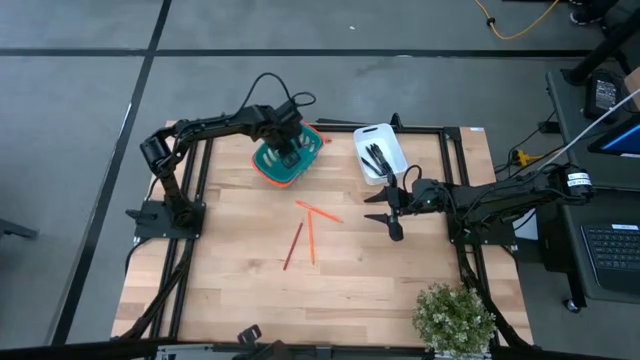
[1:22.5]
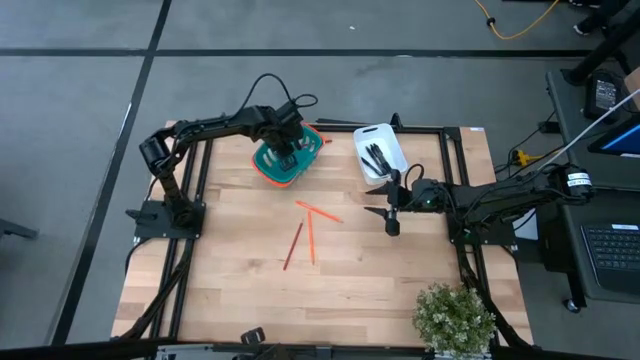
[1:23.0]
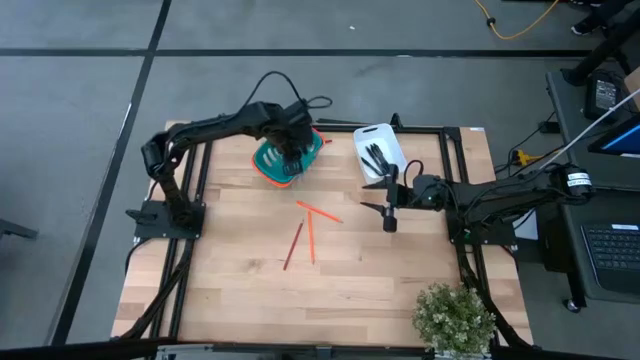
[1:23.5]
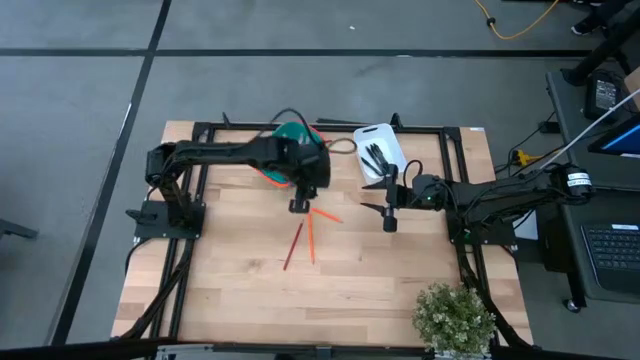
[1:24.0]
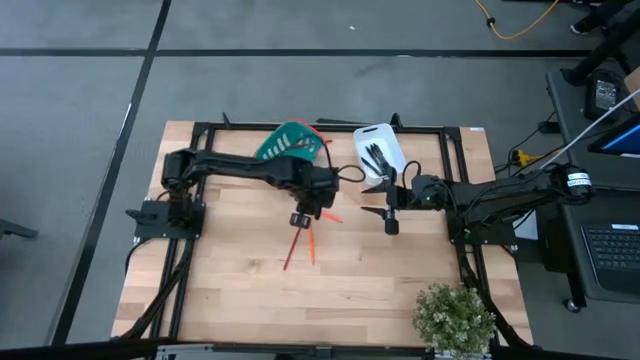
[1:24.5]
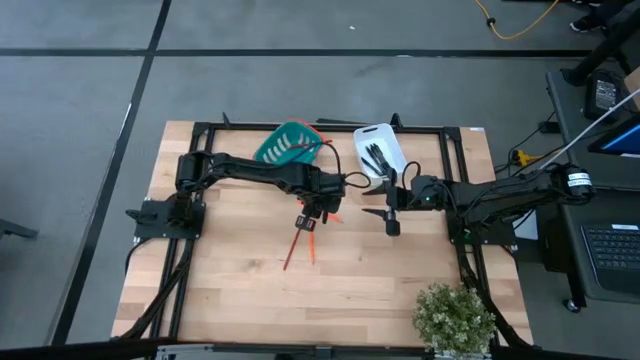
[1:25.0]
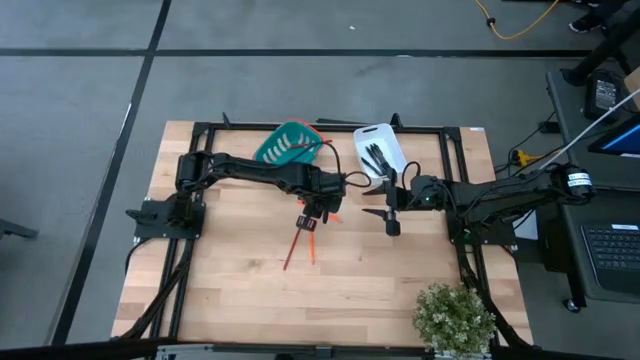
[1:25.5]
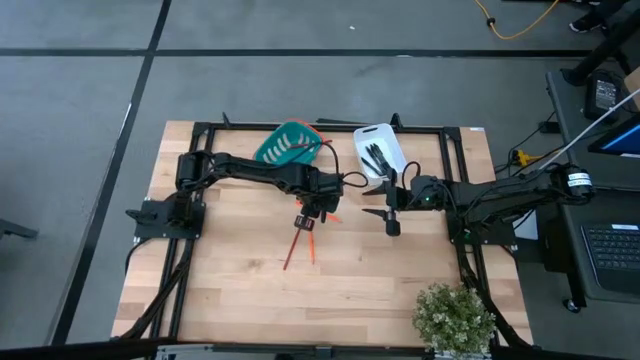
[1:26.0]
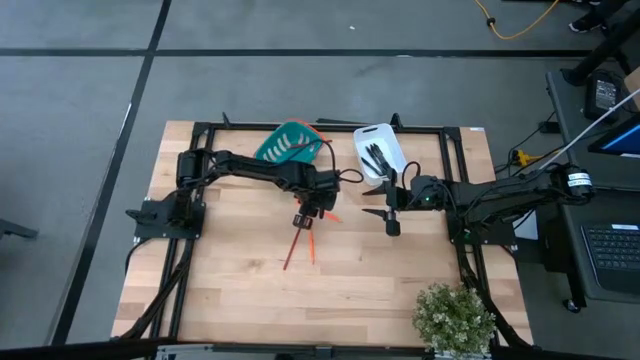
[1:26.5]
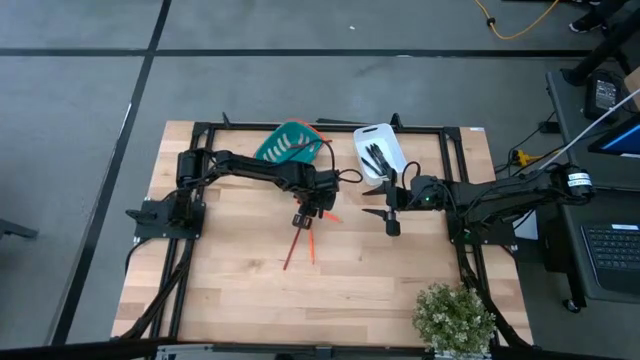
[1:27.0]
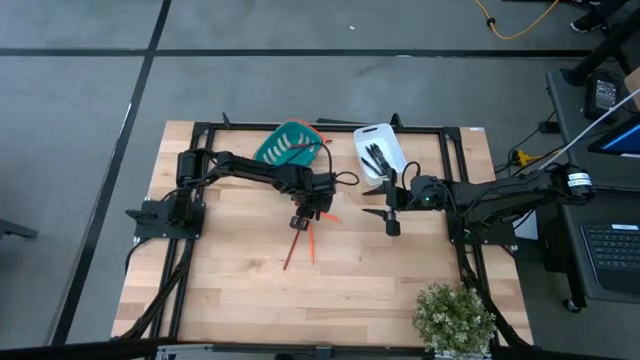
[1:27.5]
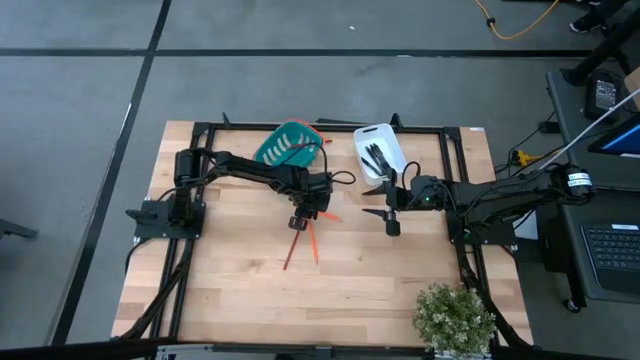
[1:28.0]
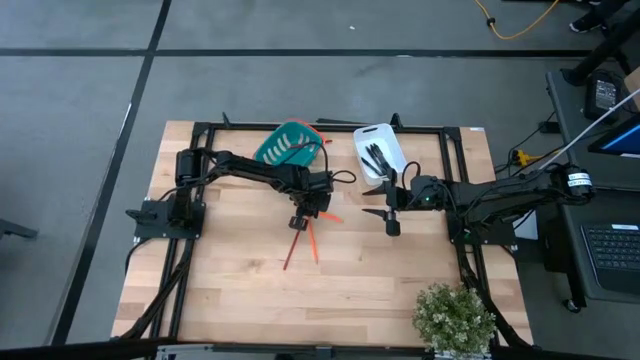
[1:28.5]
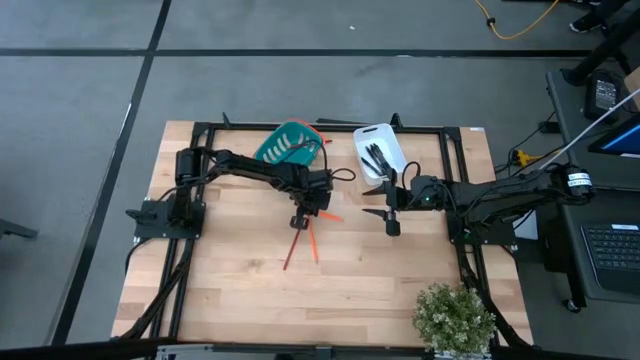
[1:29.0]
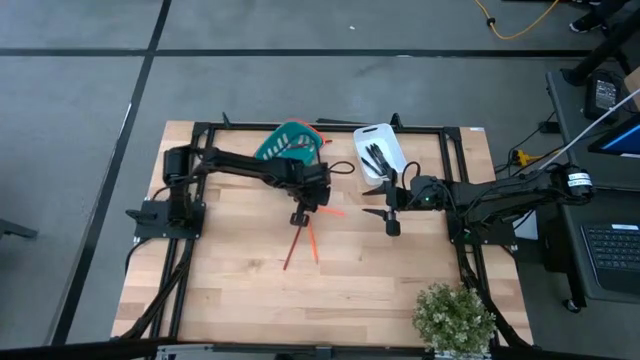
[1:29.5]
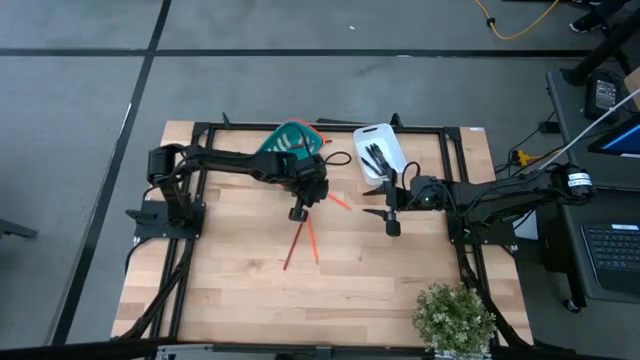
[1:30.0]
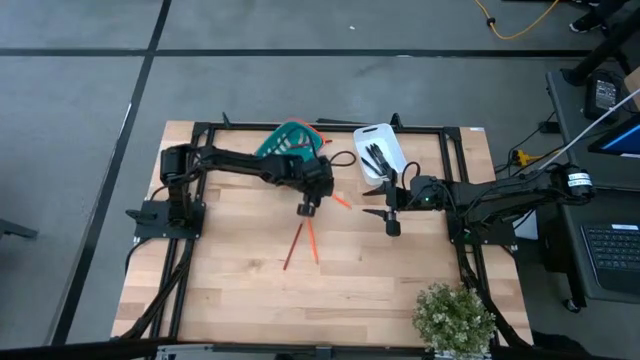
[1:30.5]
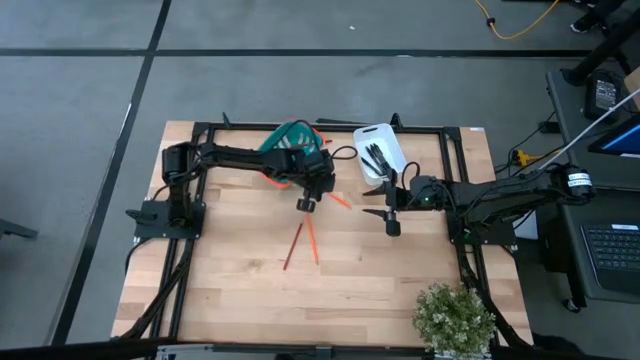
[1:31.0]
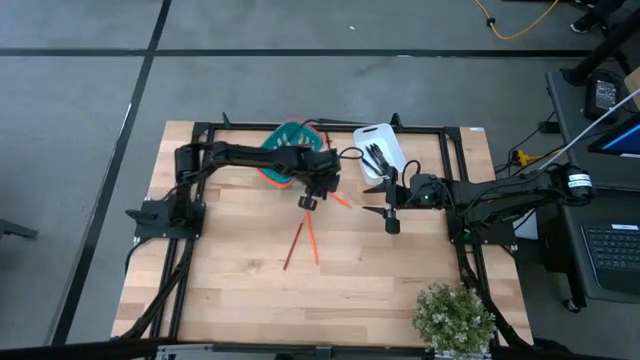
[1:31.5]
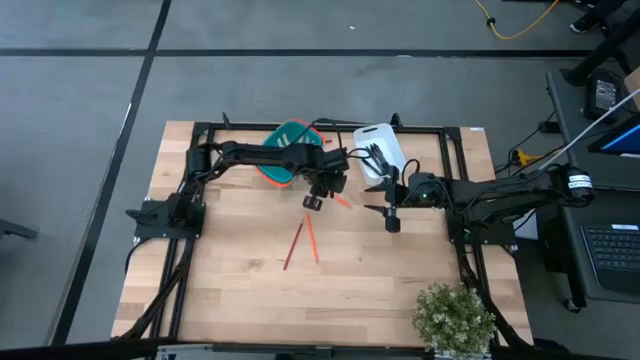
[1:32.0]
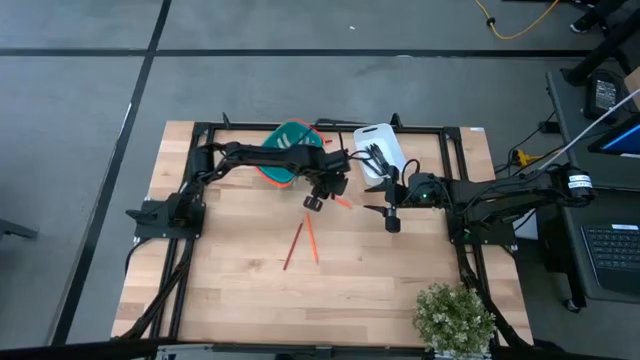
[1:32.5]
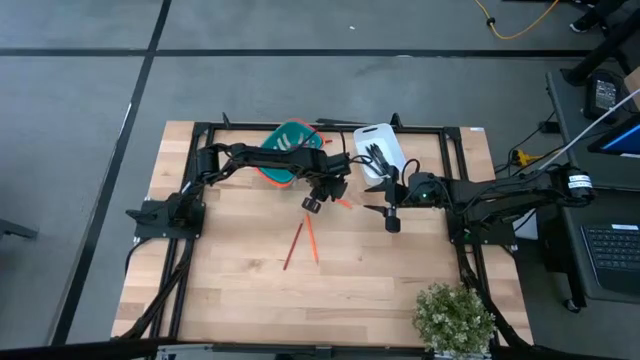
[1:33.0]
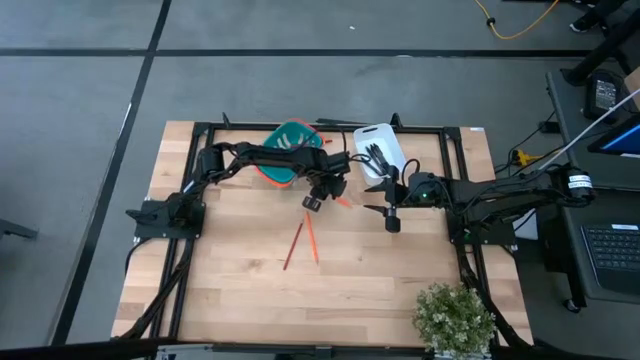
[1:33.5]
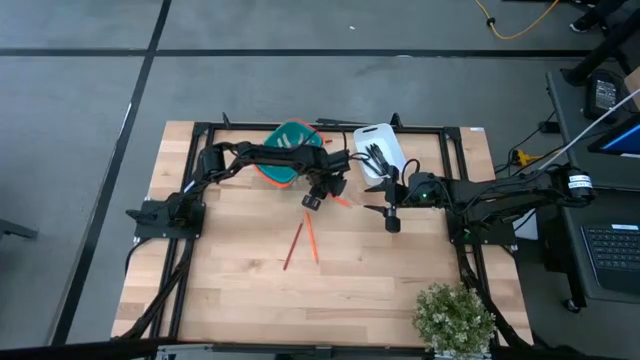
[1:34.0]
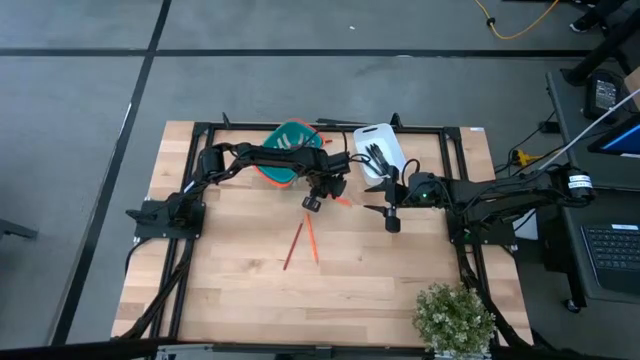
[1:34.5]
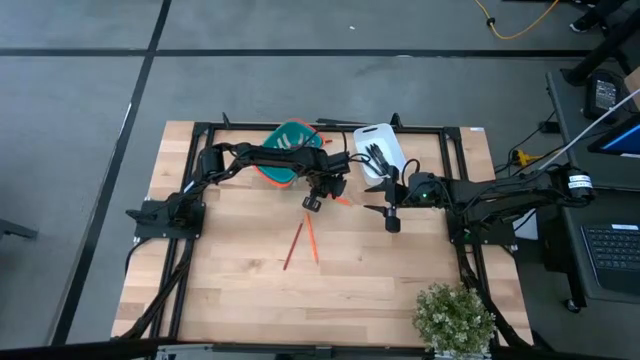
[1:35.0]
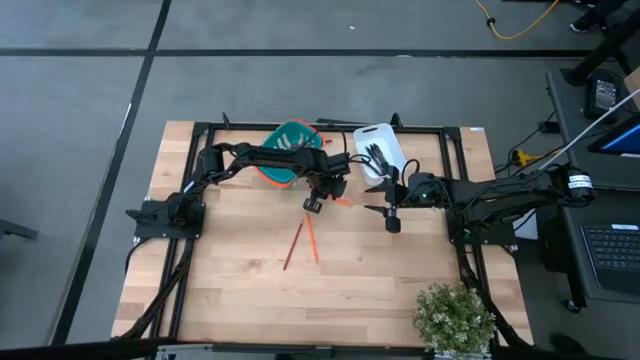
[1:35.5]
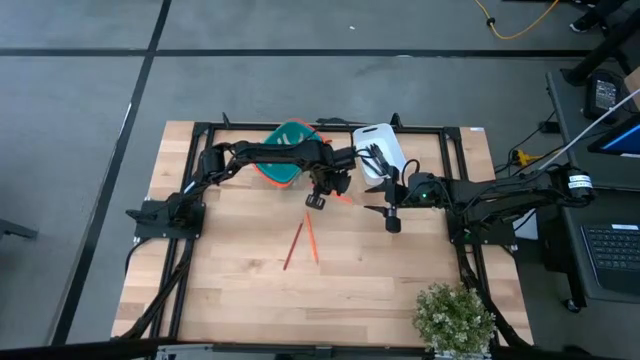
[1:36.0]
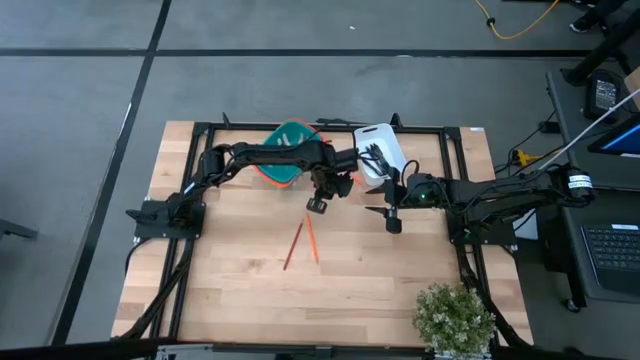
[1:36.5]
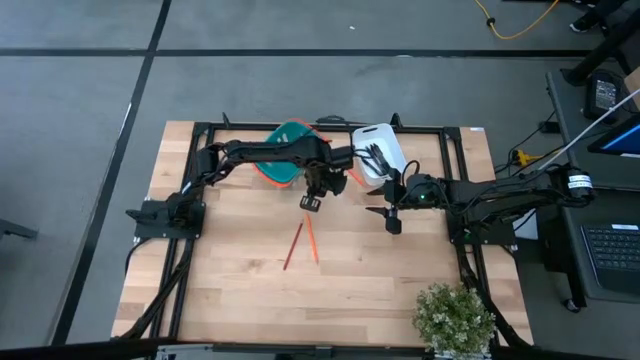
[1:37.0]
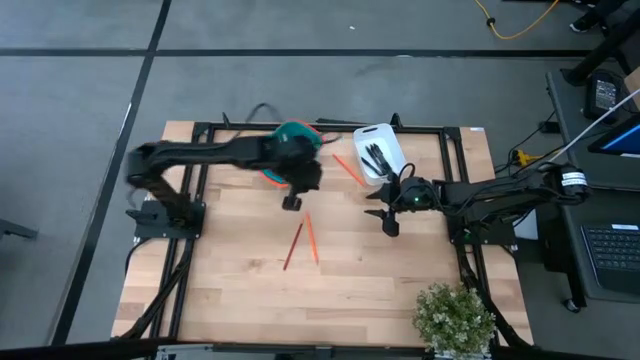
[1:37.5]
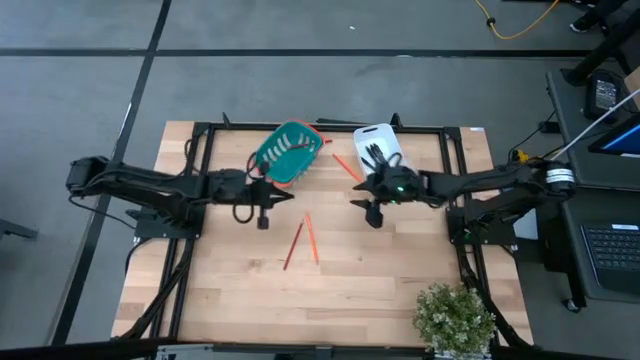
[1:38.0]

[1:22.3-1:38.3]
Task: Sort pens & pencils
Put the orange pencil into the blue bin

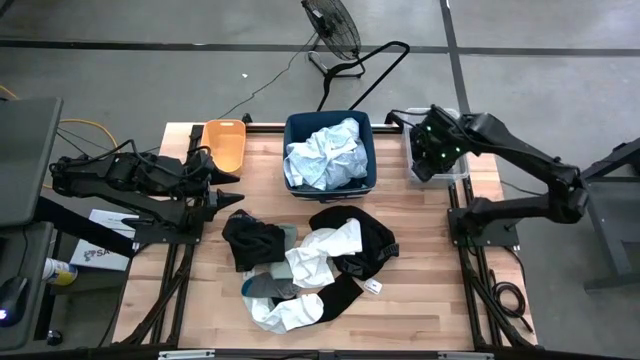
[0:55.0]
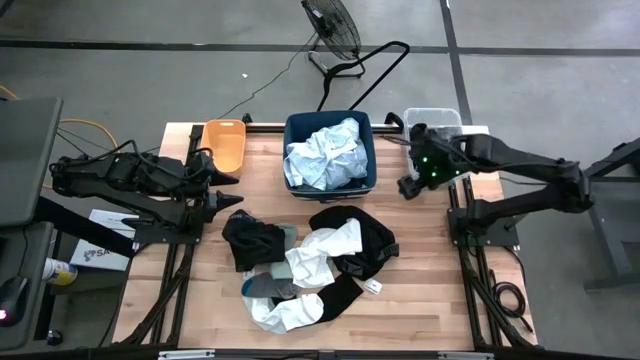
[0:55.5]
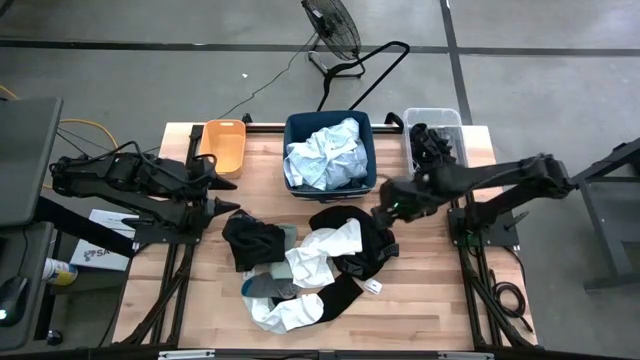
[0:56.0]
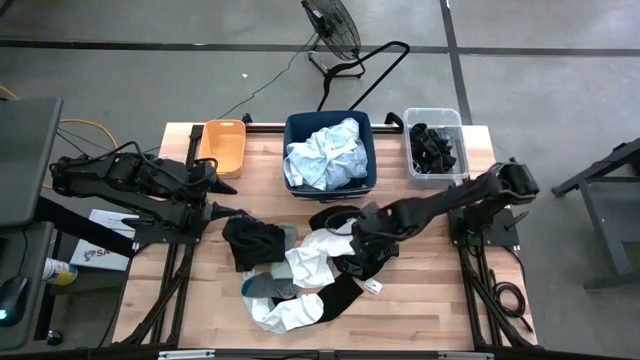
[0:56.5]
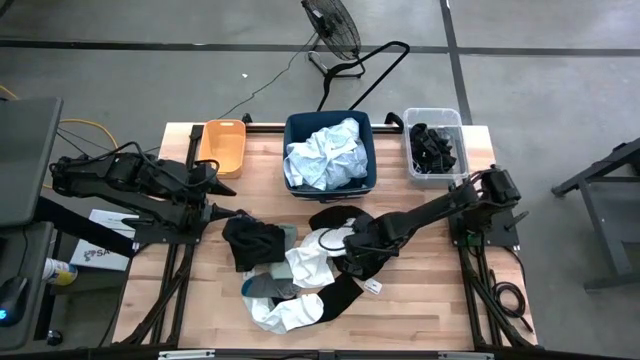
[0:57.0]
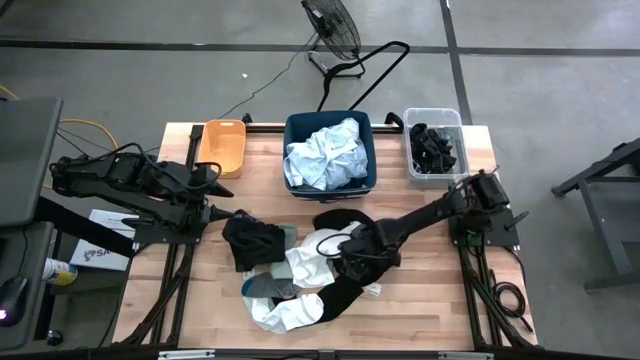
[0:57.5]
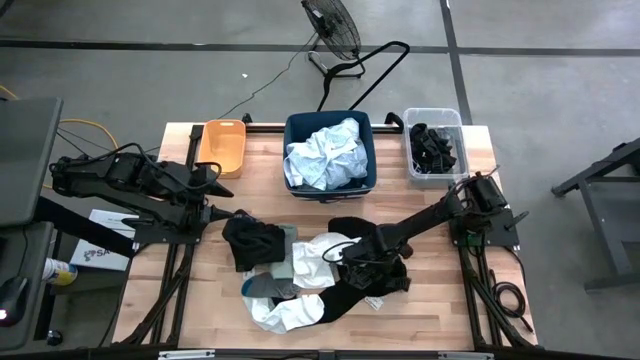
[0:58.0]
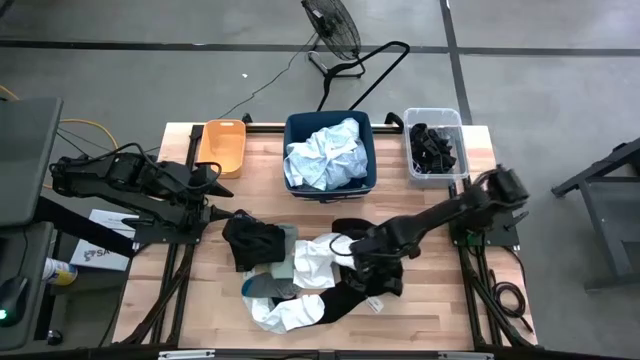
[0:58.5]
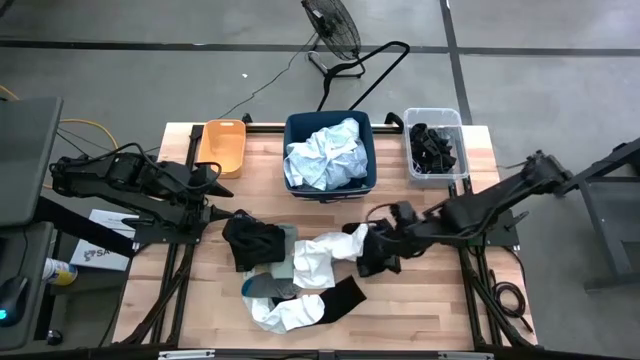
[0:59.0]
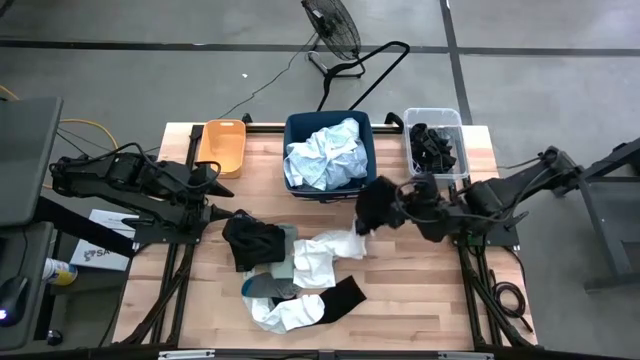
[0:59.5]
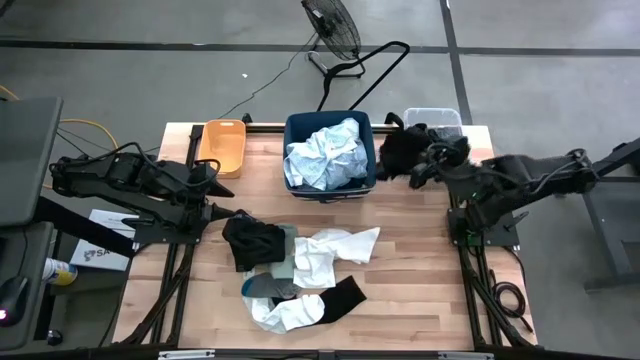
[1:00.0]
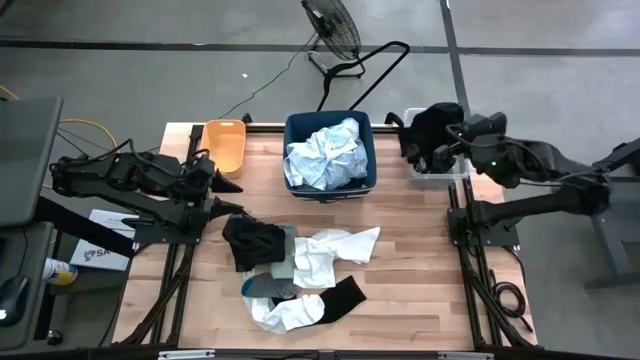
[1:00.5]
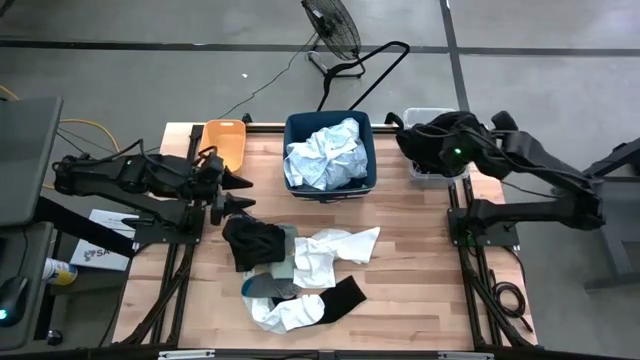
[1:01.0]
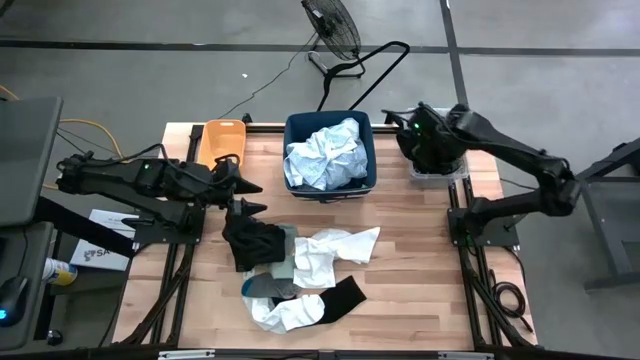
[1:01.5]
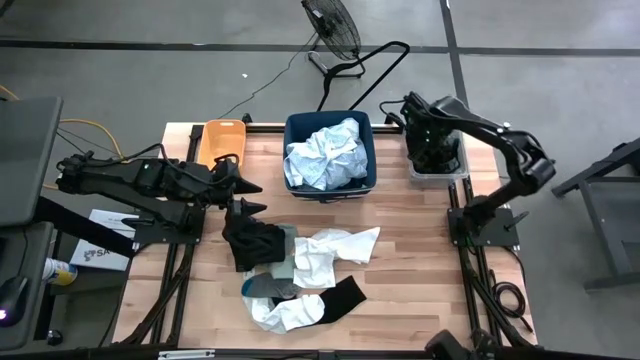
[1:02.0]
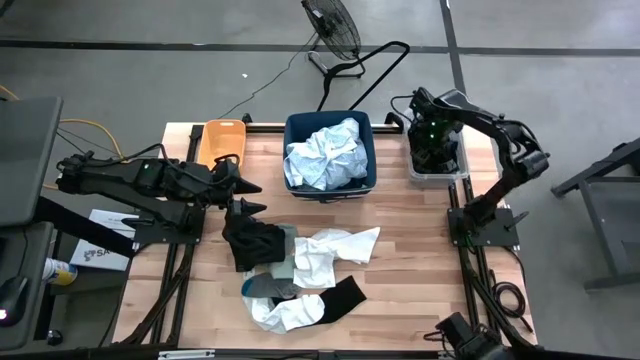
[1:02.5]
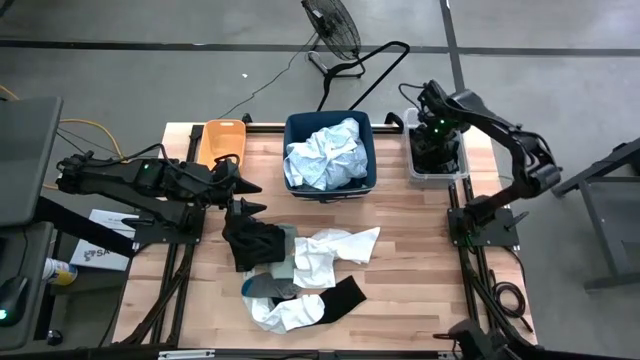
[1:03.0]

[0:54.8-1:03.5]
Task: Pick & Place Cloths
Put the black boxers into the transparent bin
